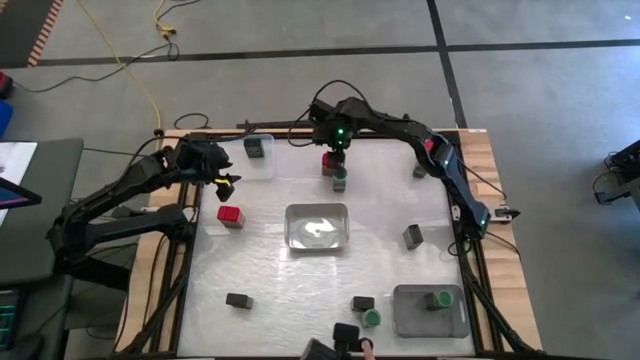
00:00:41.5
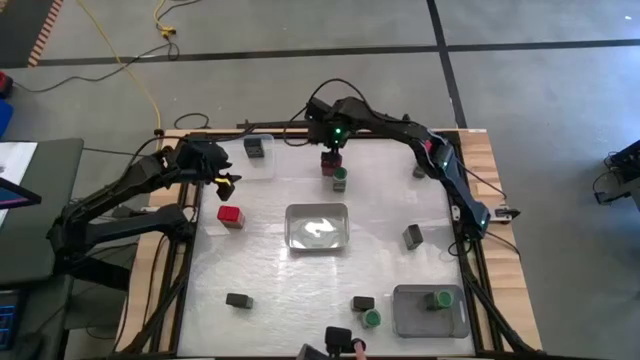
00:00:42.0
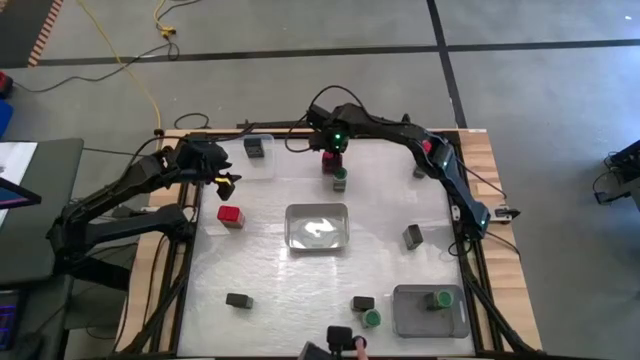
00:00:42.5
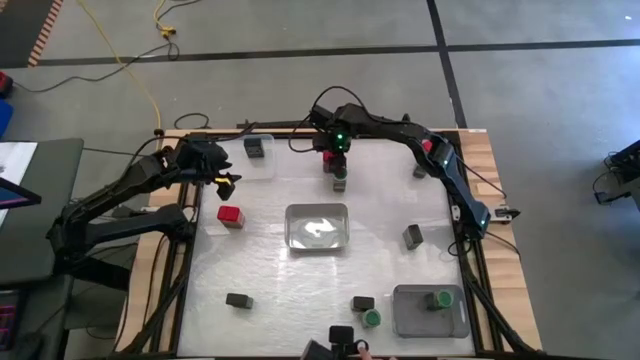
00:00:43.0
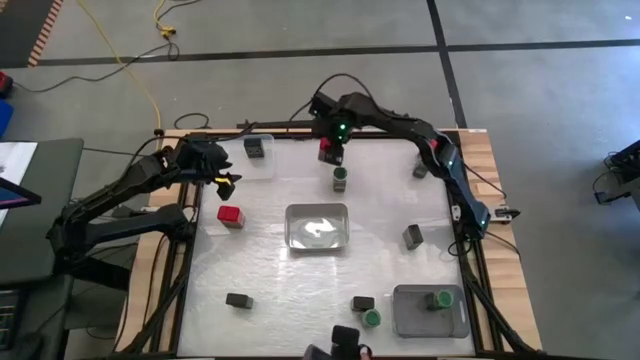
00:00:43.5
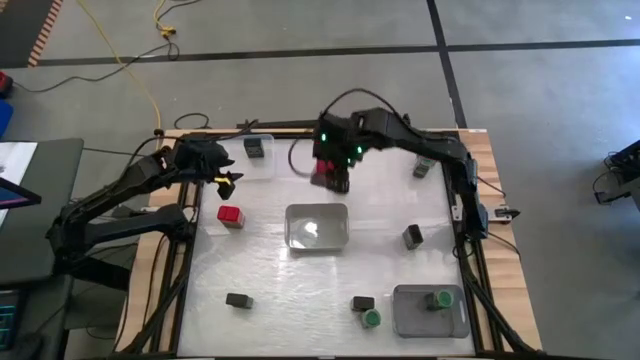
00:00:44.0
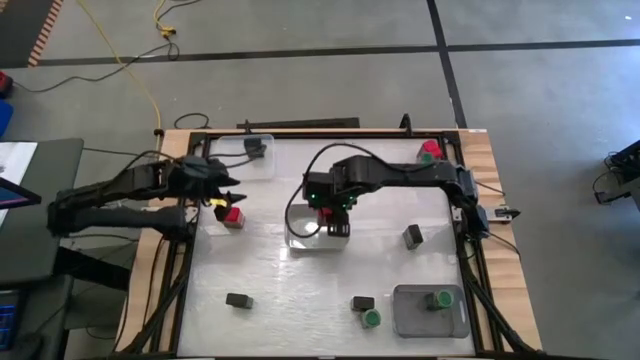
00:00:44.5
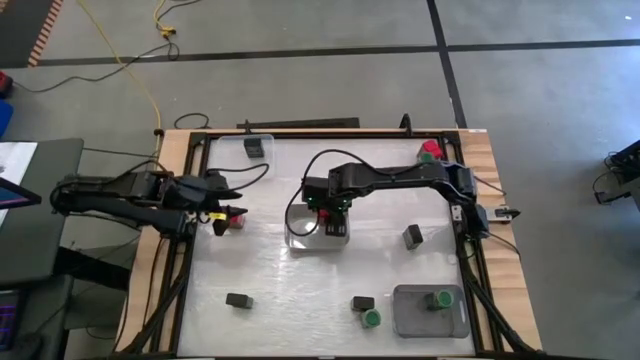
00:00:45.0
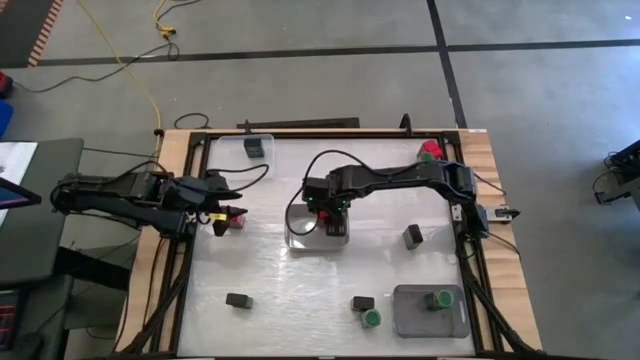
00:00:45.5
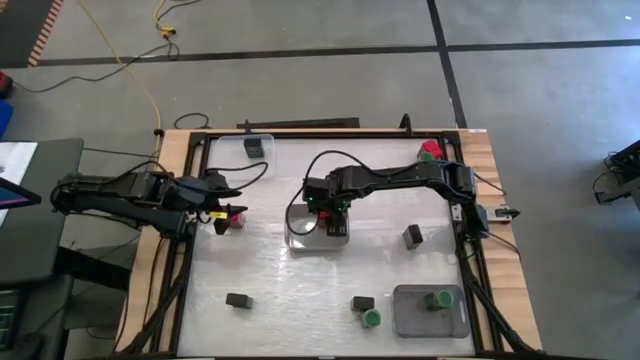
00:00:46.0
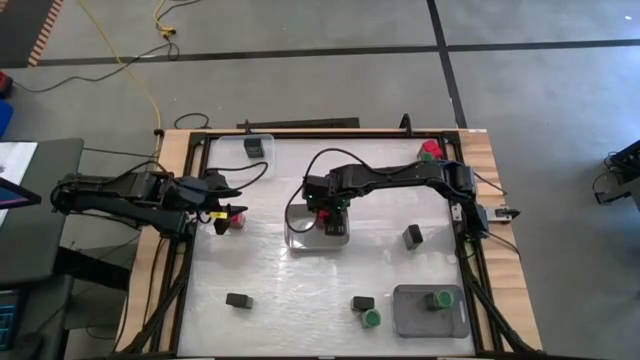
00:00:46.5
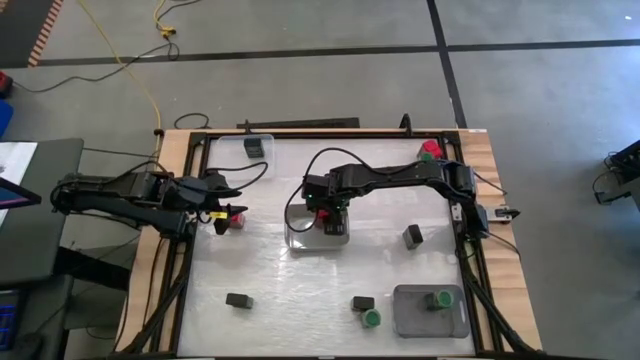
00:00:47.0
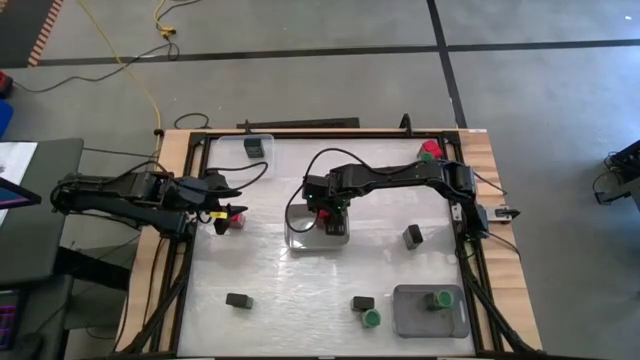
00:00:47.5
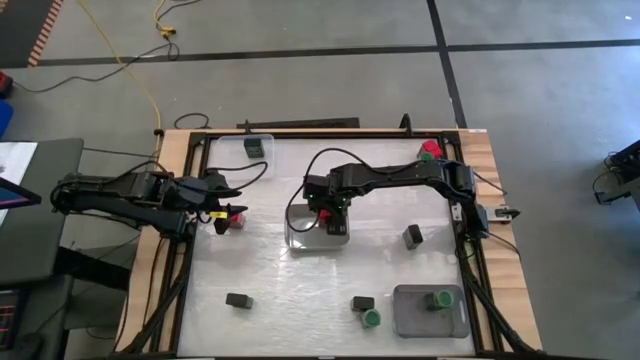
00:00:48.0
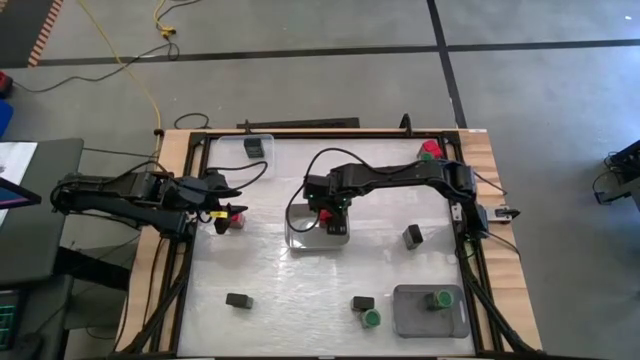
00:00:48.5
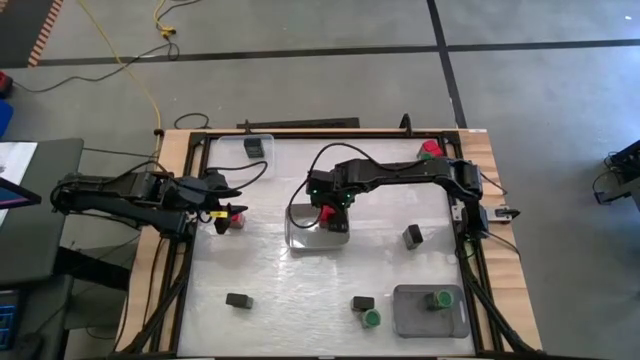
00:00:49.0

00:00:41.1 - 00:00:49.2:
Task: Sort spices by type
Put the middle red seasoning can into the gray bin

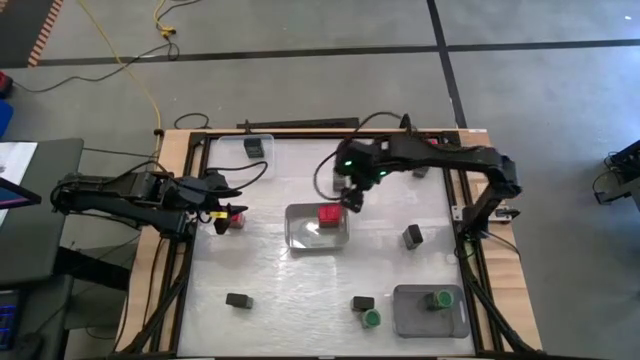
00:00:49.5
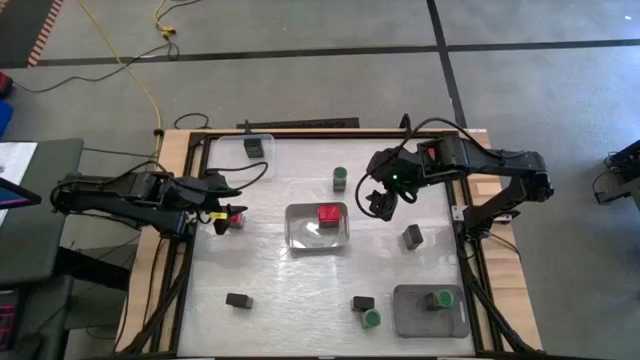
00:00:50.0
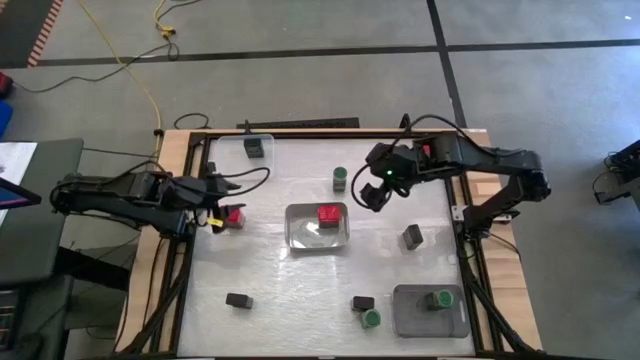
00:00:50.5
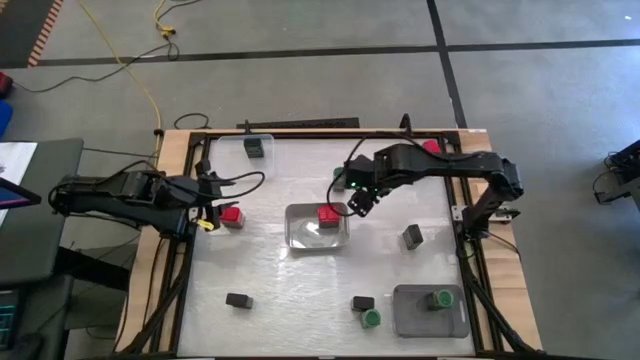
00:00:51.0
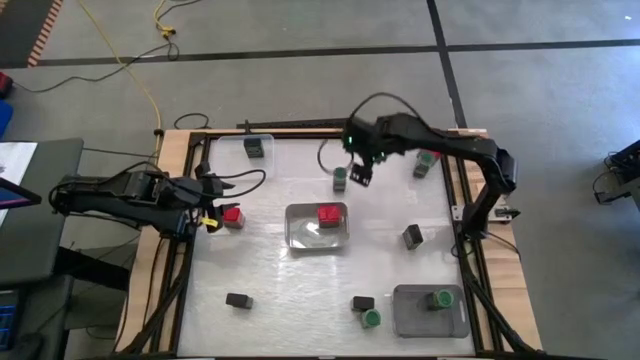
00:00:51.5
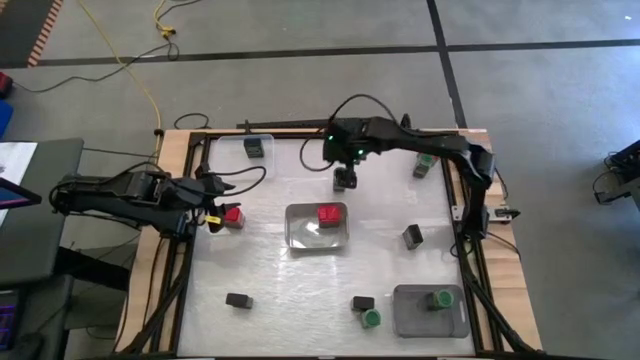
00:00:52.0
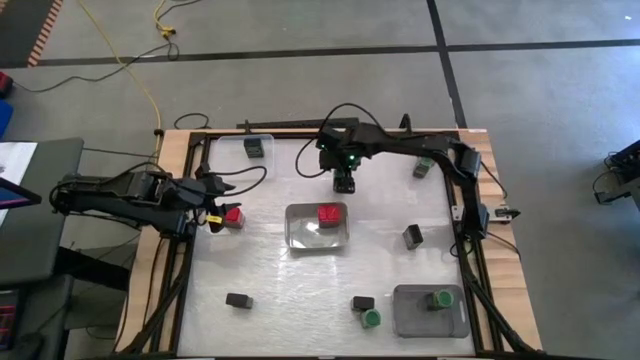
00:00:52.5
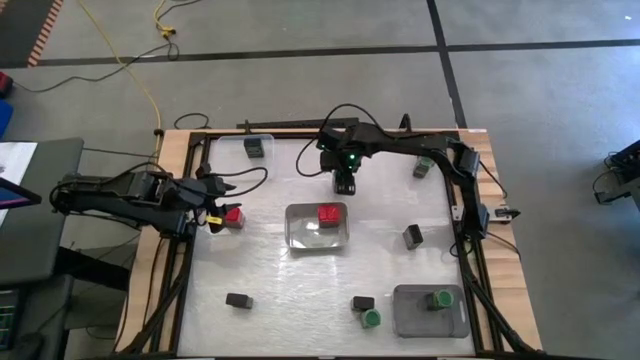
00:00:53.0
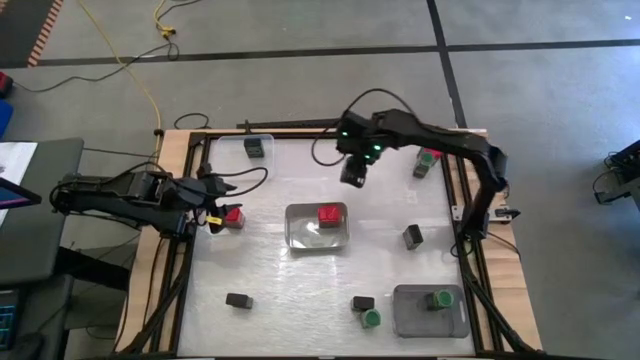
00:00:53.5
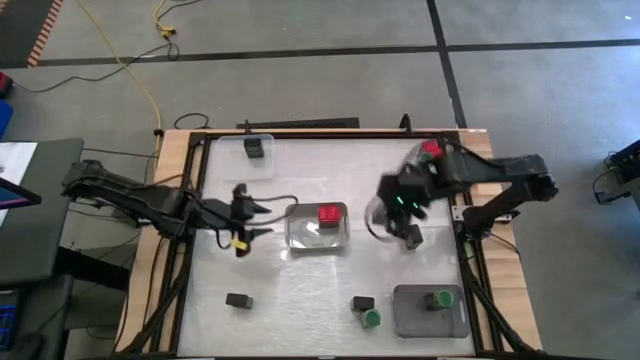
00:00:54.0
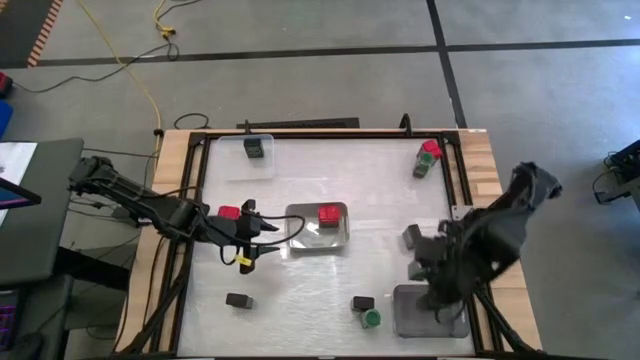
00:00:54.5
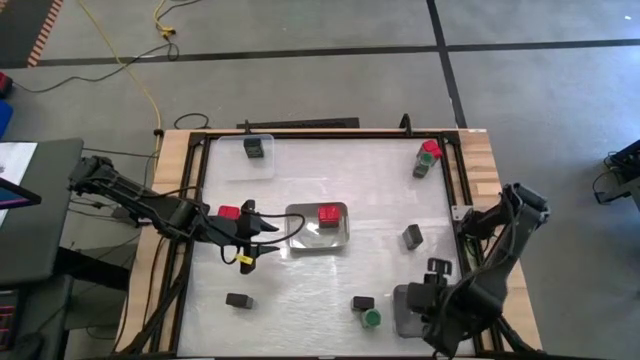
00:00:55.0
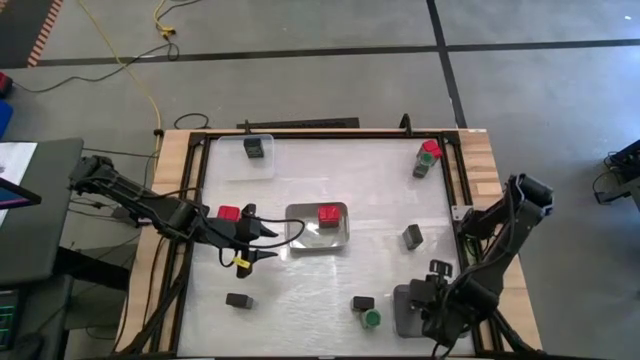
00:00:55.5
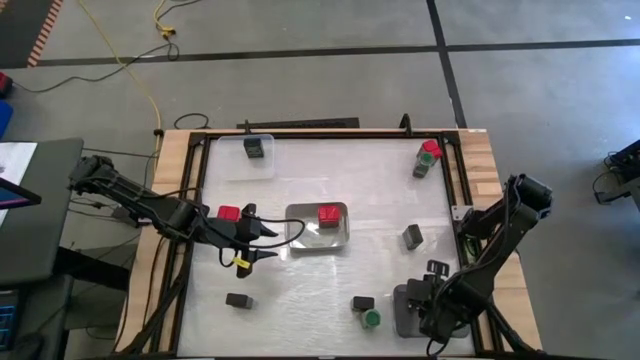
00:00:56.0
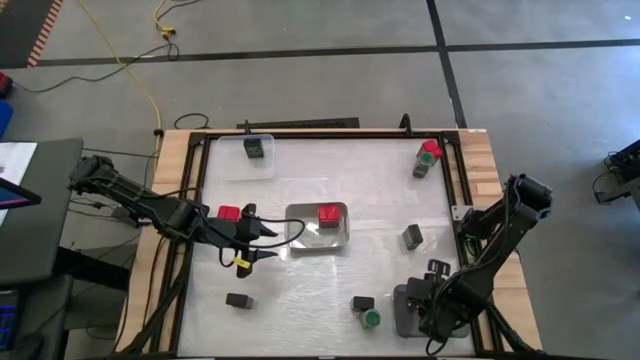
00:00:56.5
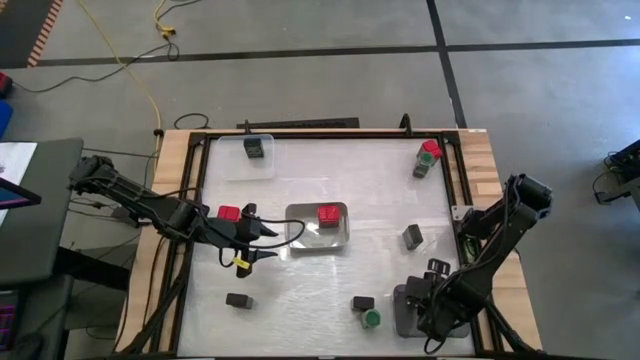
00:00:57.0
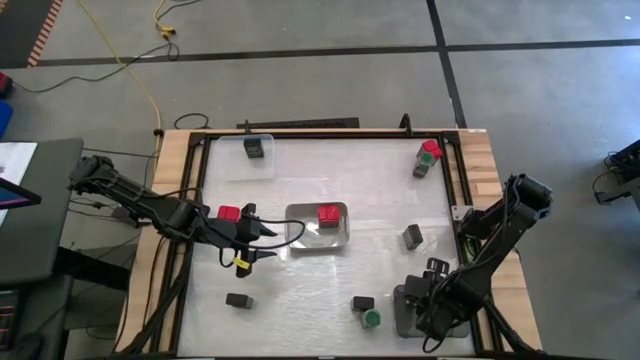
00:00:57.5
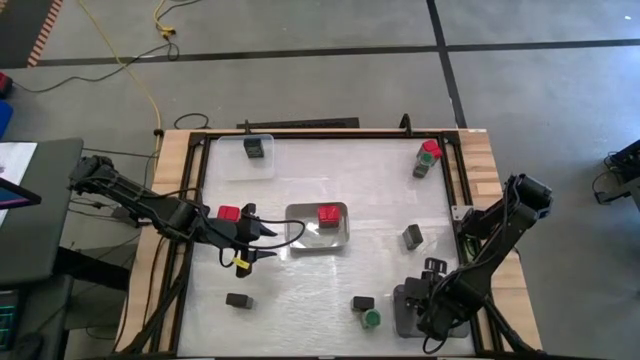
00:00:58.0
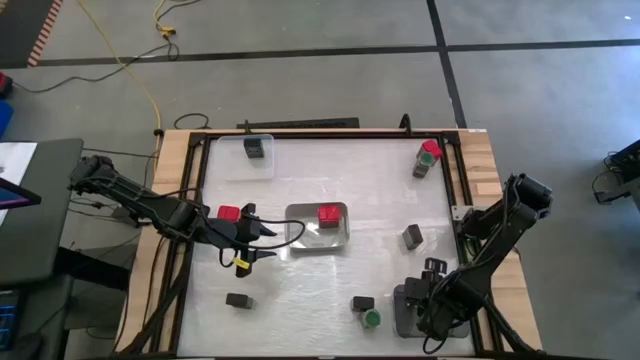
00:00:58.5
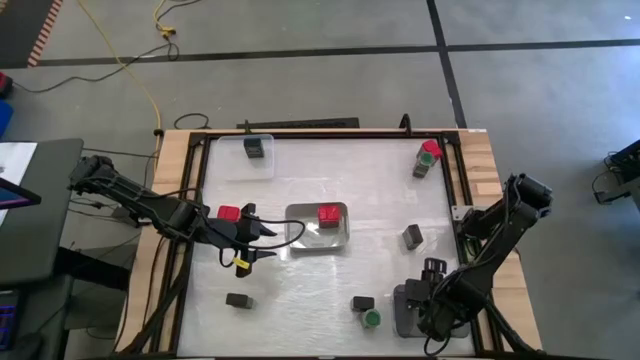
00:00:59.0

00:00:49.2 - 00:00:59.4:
Put the top left green seasoning bottle into the black bin

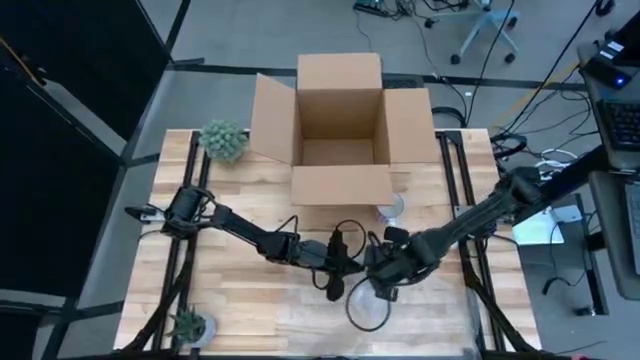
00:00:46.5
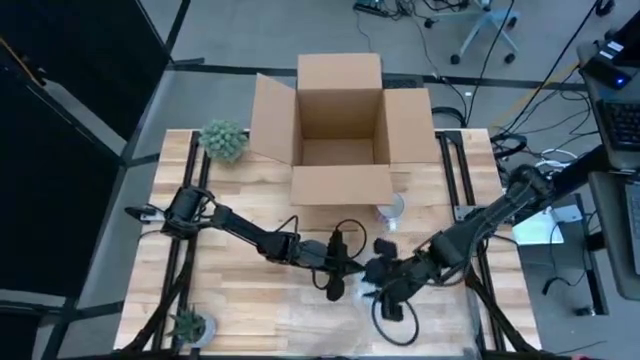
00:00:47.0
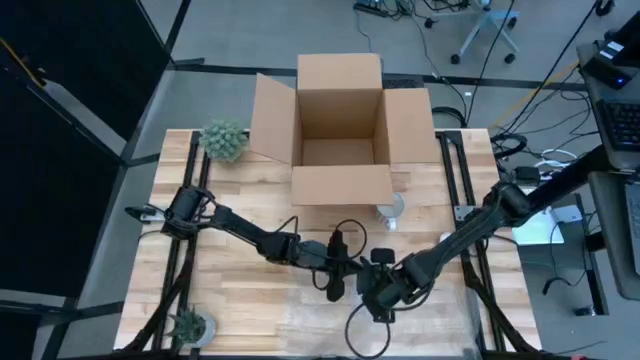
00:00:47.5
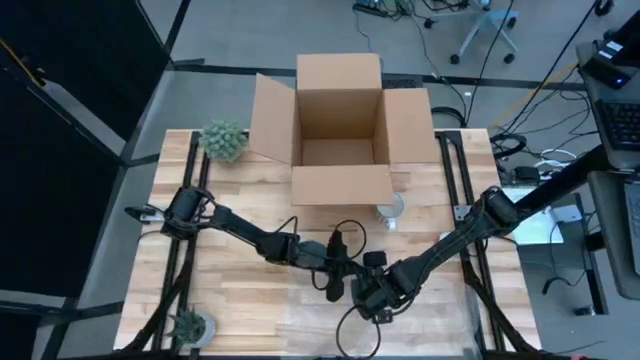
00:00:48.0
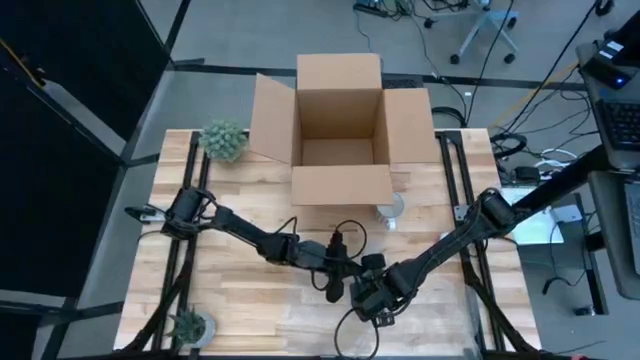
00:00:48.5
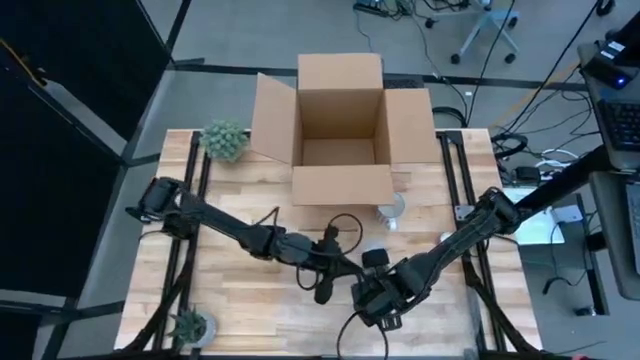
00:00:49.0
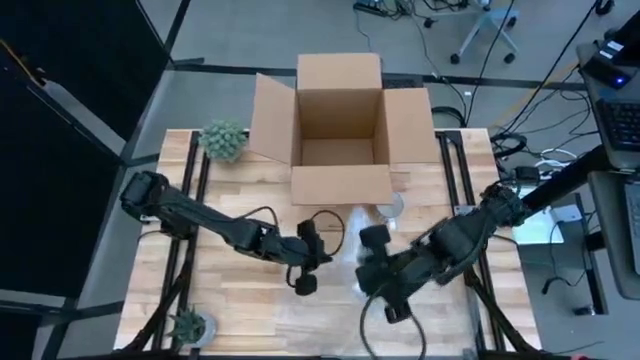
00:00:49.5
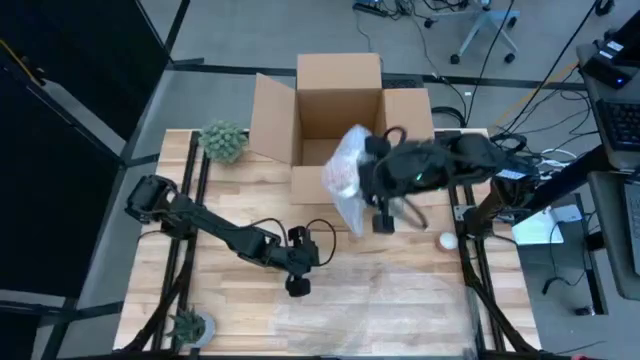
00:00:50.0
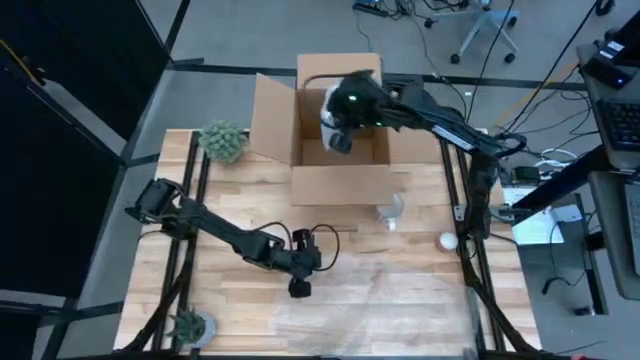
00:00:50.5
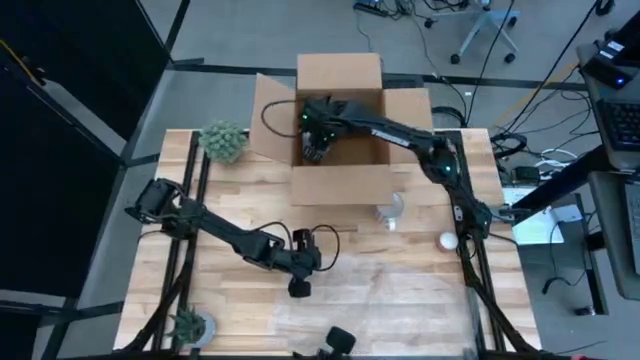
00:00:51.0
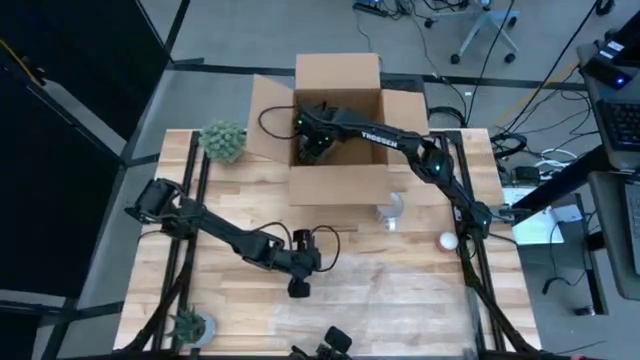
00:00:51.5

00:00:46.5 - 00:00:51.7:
Task: wrap mug
Put the wrapped orange mug into the cardboard box
